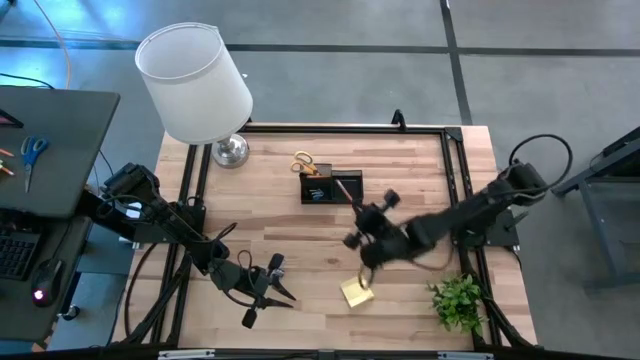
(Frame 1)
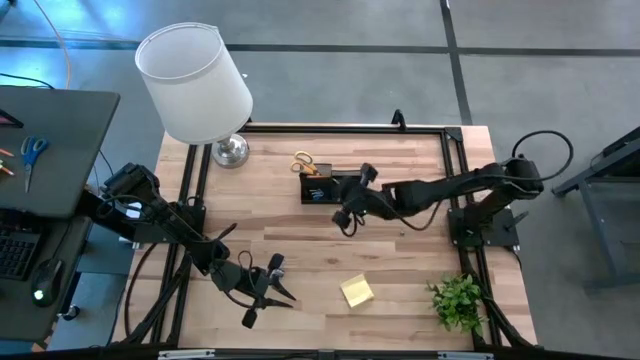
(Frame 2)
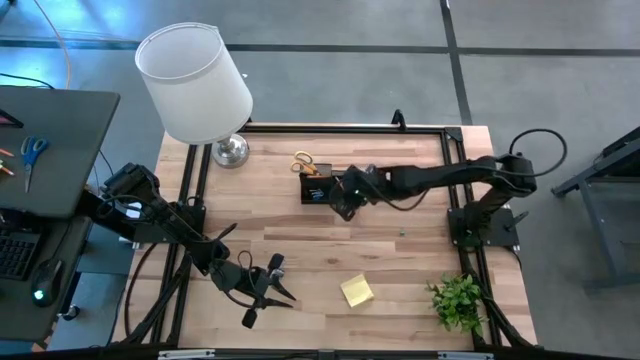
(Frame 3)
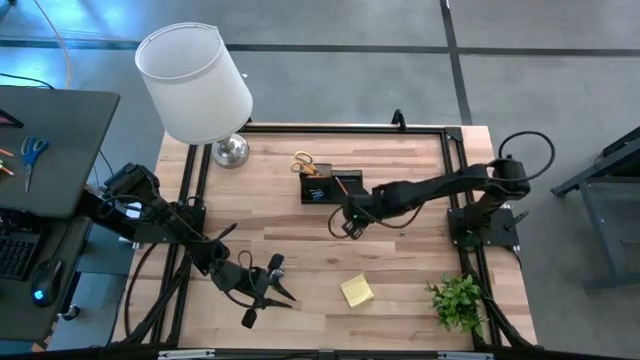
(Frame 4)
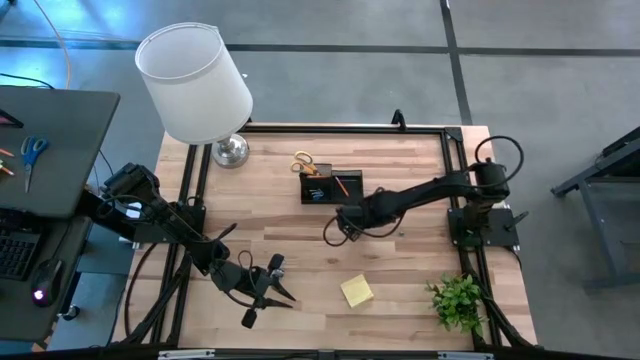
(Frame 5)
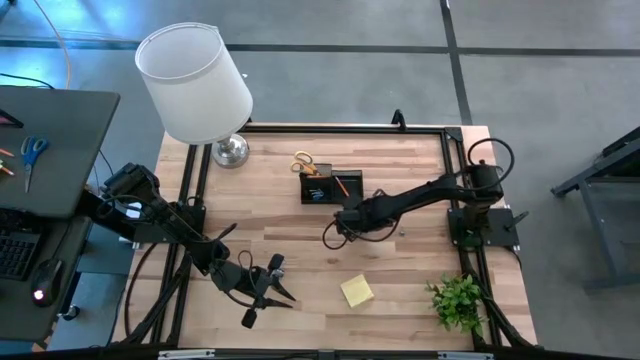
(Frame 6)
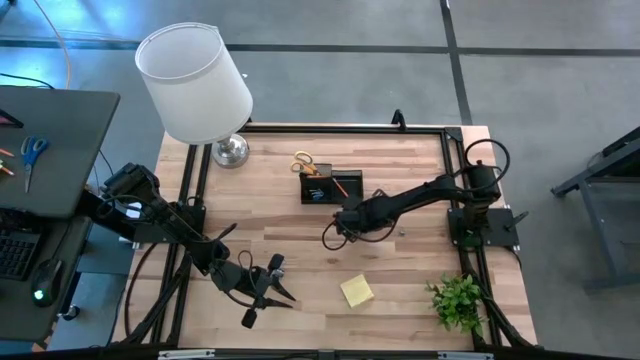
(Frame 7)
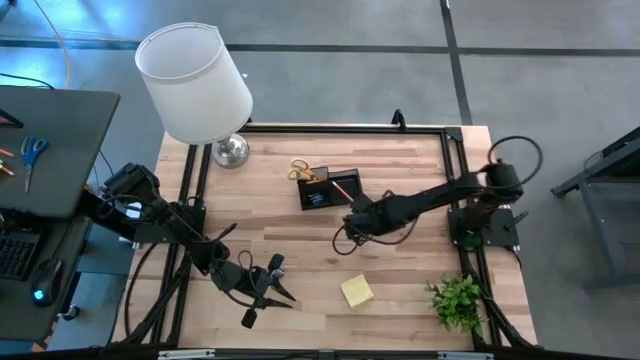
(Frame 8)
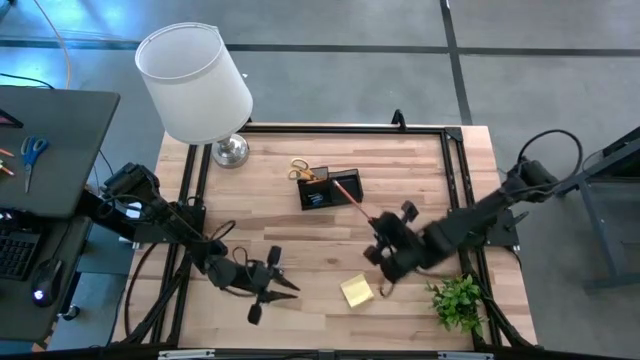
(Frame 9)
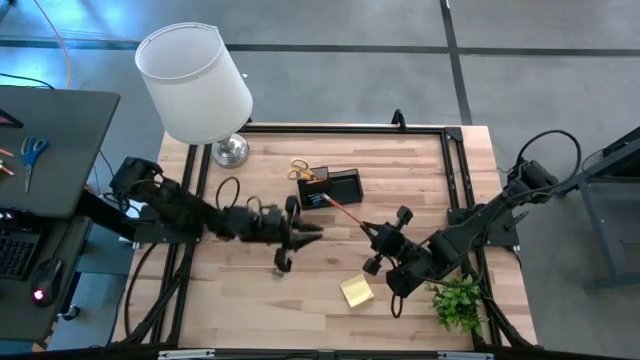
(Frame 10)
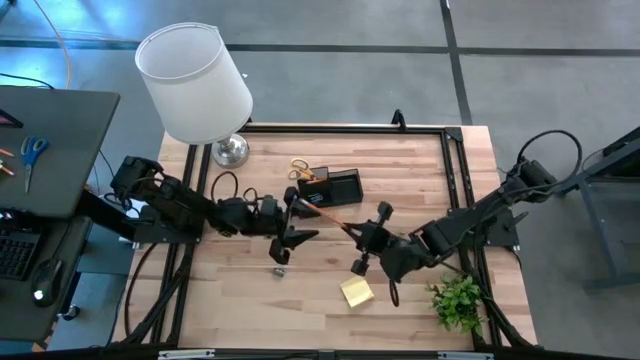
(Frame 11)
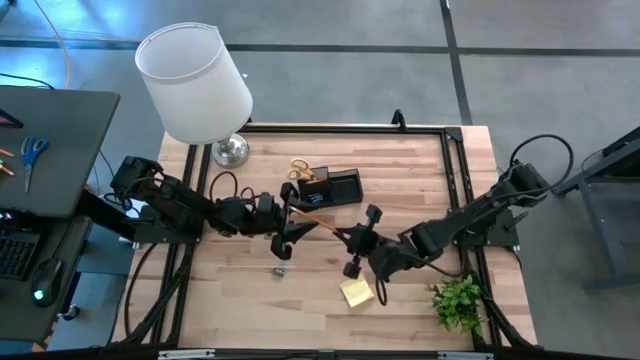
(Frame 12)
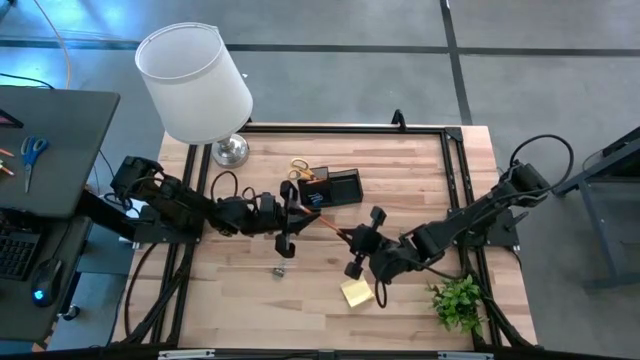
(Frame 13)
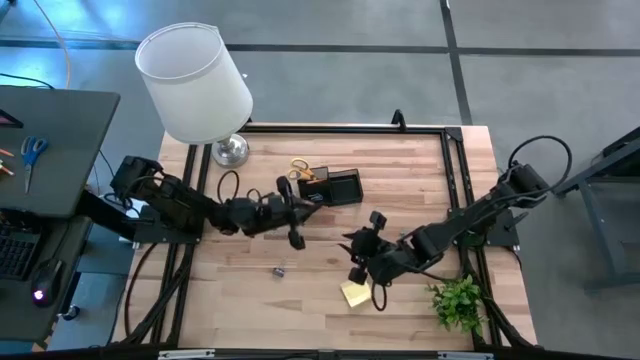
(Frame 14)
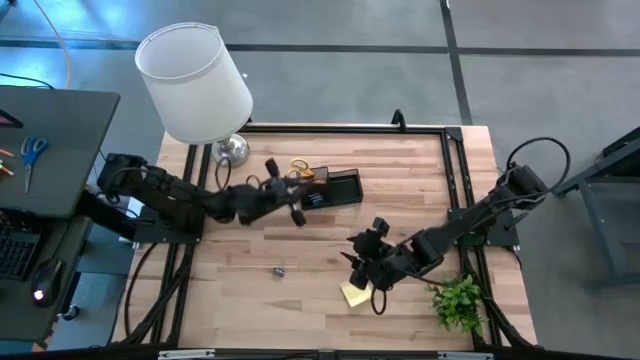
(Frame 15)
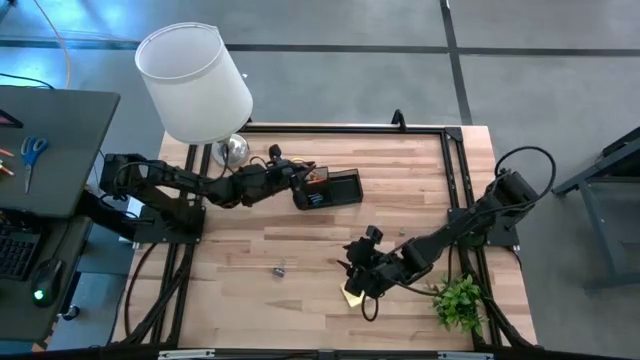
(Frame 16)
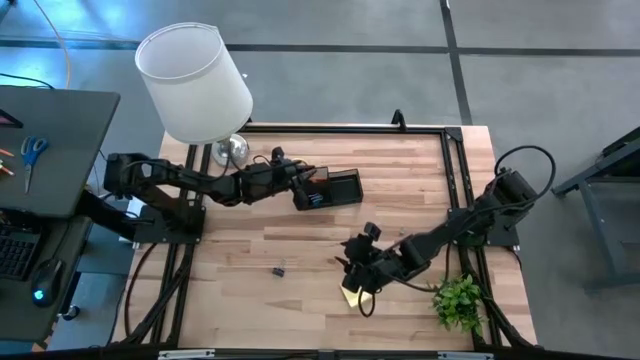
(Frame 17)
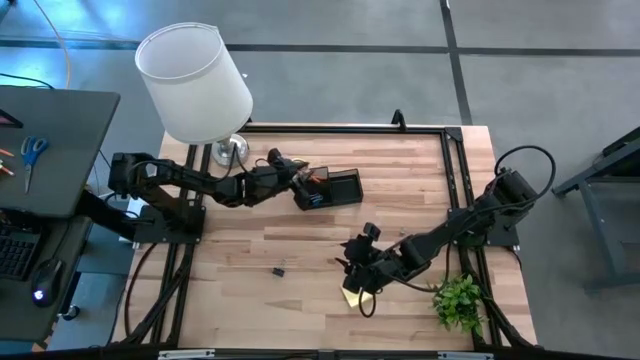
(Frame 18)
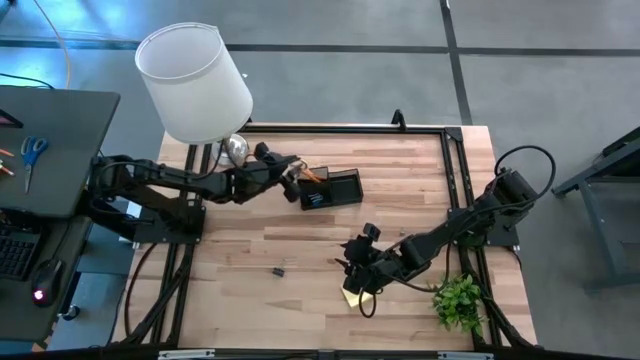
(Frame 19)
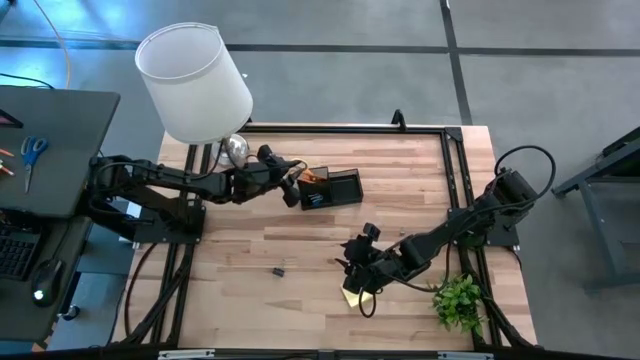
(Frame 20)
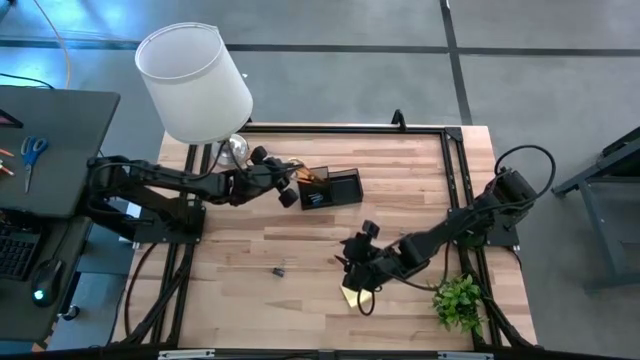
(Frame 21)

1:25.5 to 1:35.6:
Task: Pick and place office supplies into organizer
Put the orange pencil into the black desk organizer

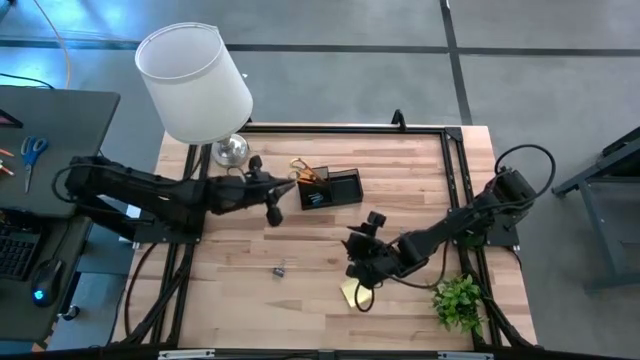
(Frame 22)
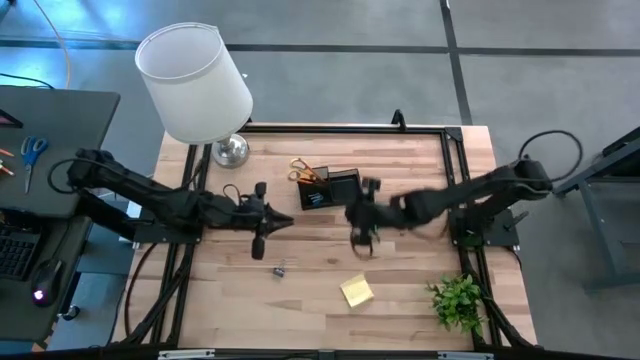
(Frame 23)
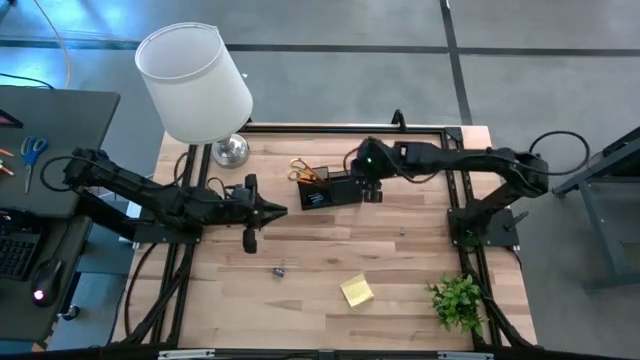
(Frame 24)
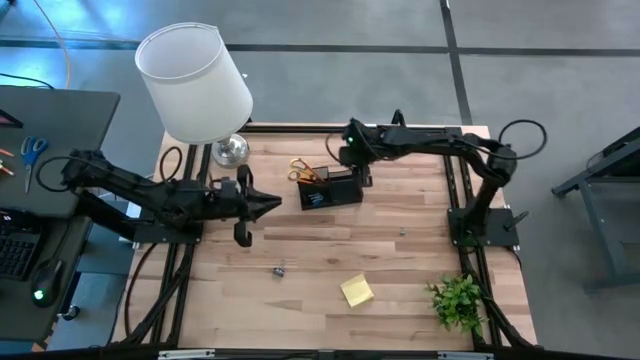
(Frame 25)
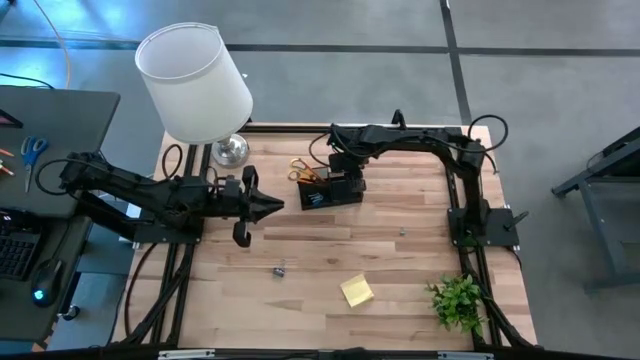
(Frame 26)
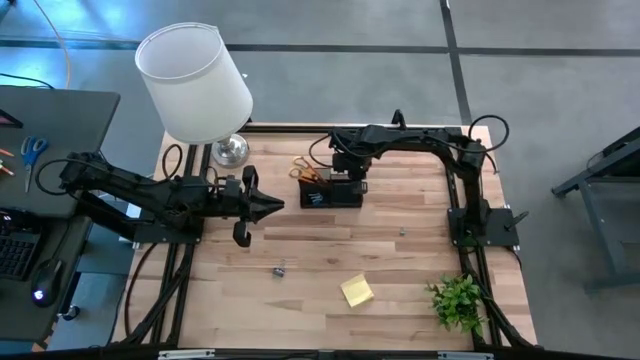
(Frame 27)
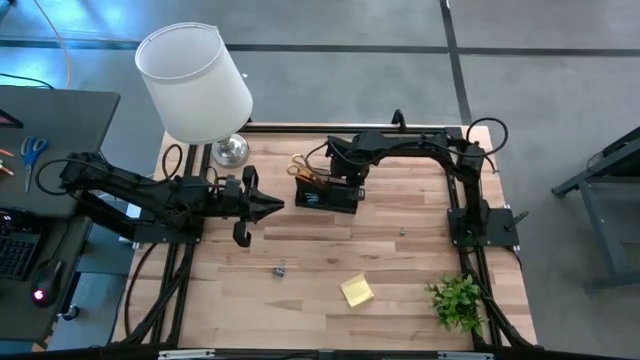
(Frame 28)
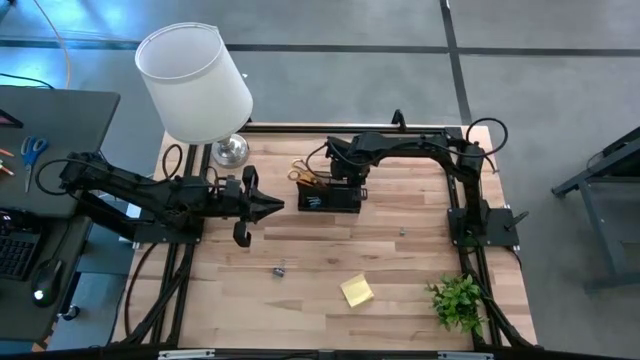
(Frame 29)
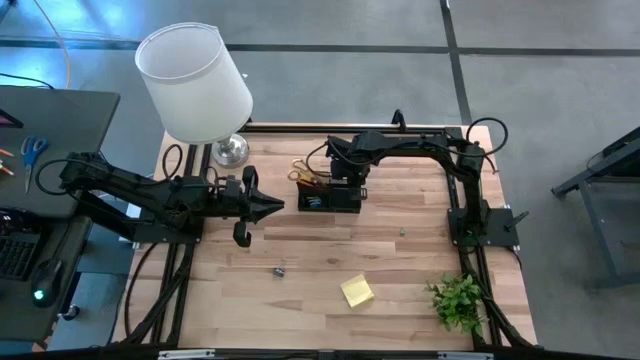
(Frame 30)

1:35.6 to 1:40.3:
Adjust the black desk organizer

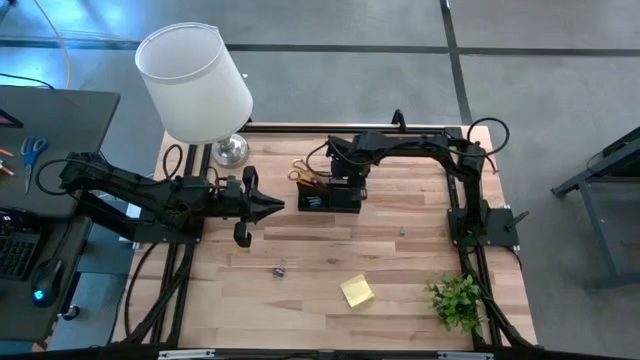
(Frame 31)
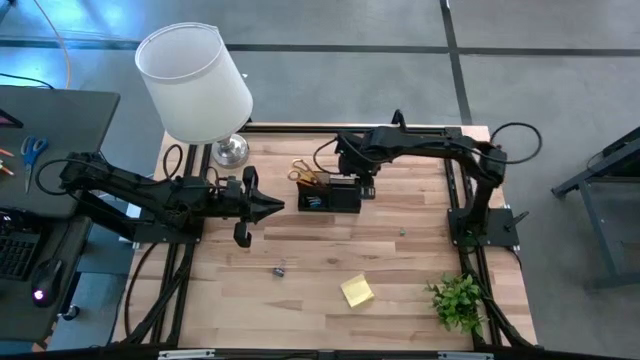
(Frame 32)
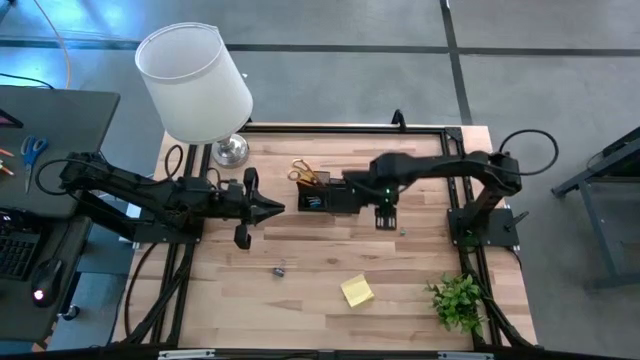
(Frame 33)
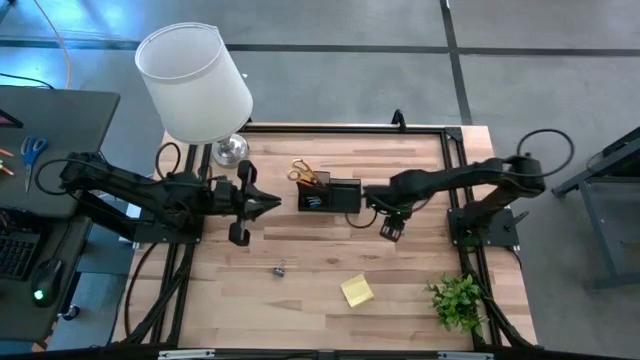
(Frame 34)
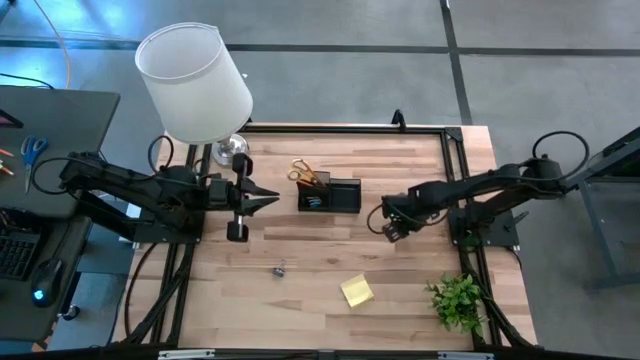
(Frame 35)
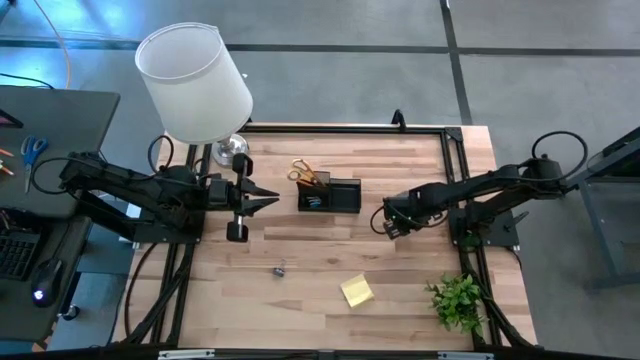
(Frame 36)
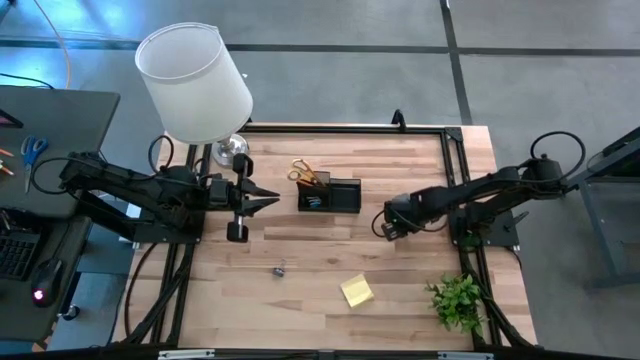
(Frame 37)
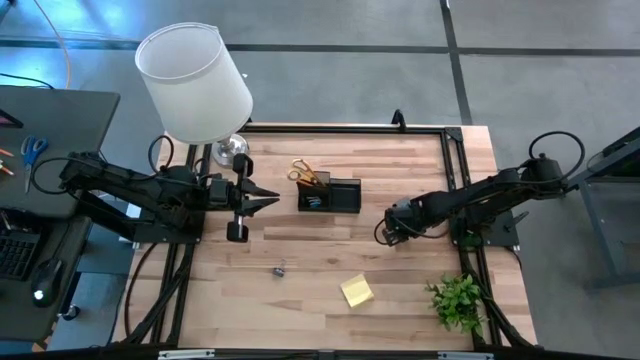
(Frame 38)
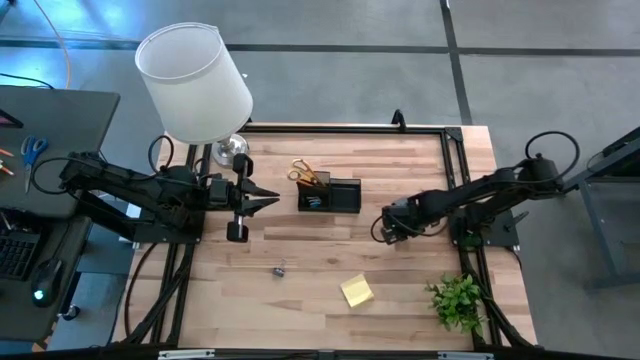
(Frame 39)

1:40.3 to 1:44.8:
Put the blue binder clip into the black desk organizer

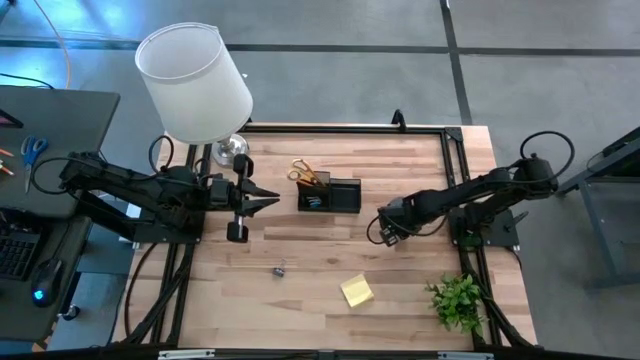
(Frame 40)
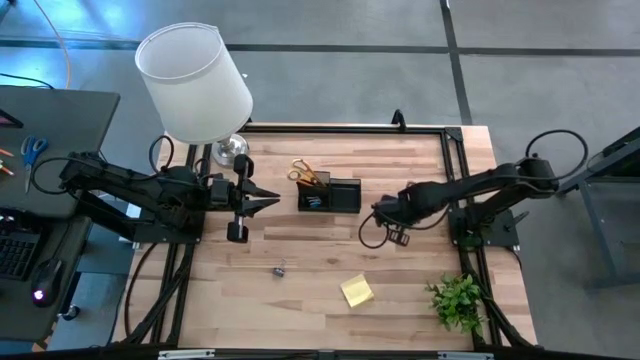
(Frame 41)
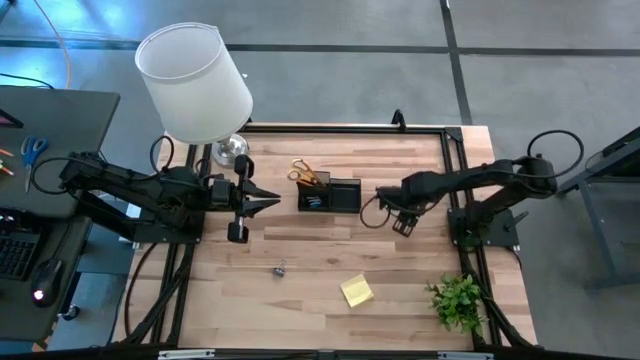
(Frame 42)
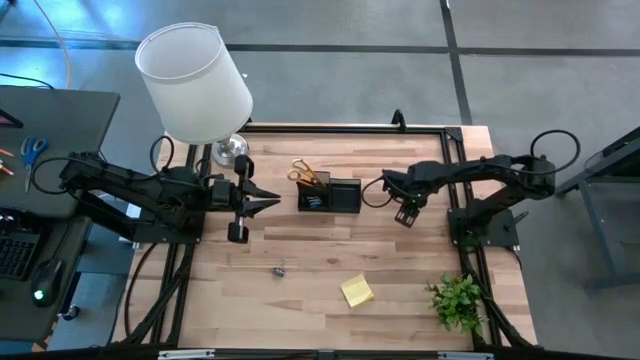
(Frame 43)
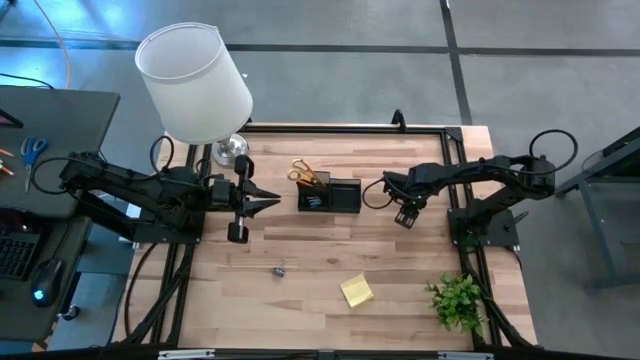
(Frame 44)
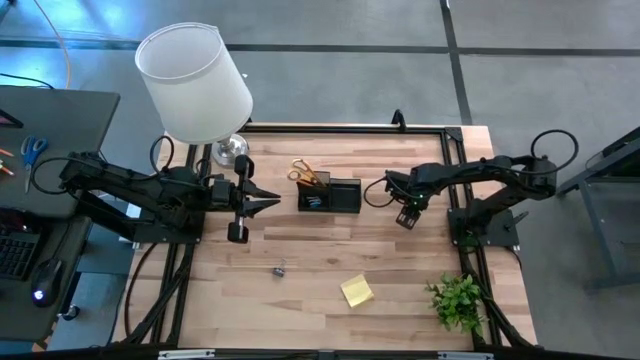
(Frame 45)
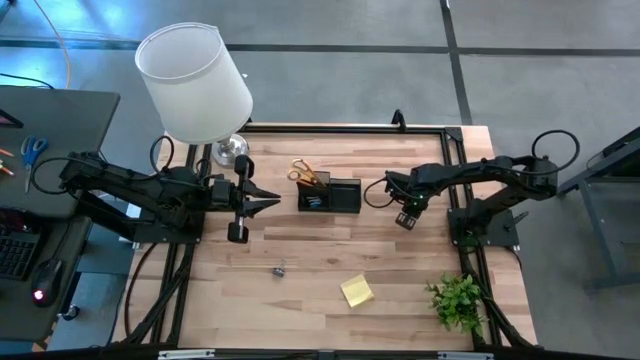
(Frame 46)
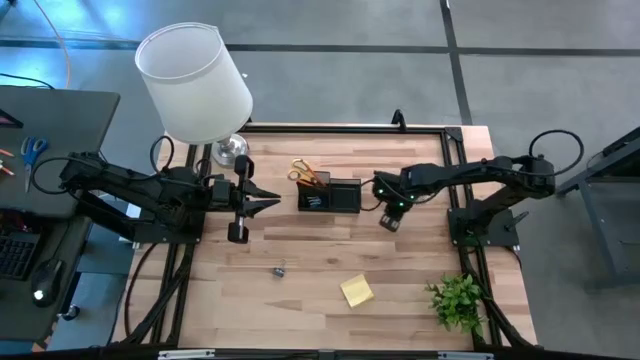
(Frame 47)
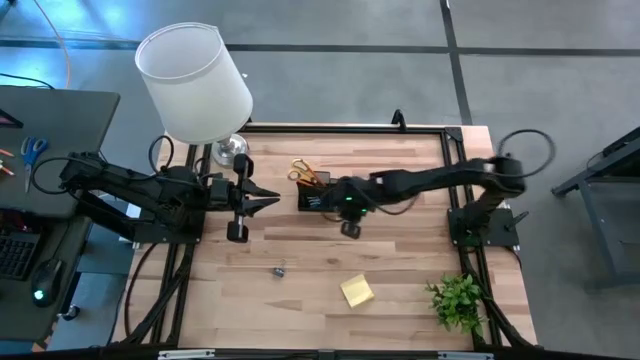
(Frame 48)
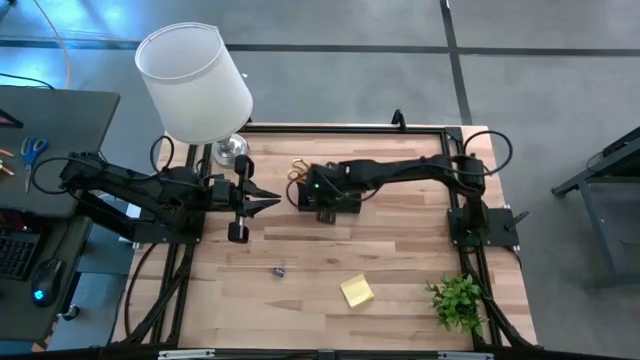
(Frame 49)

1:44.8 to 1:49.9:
Put the blue binder clip into the black desk organizer
